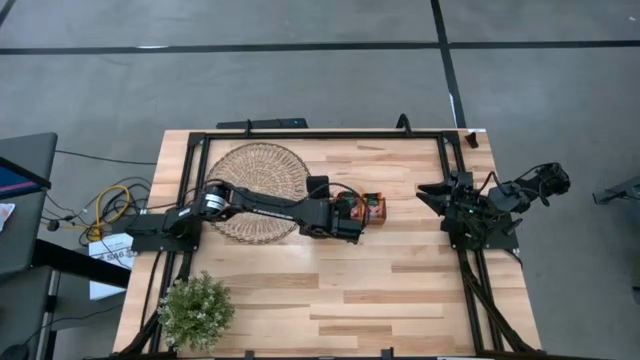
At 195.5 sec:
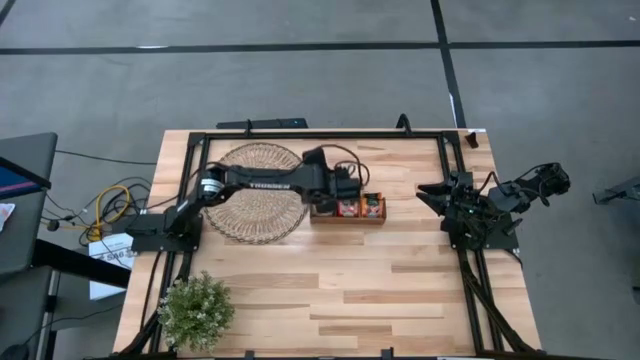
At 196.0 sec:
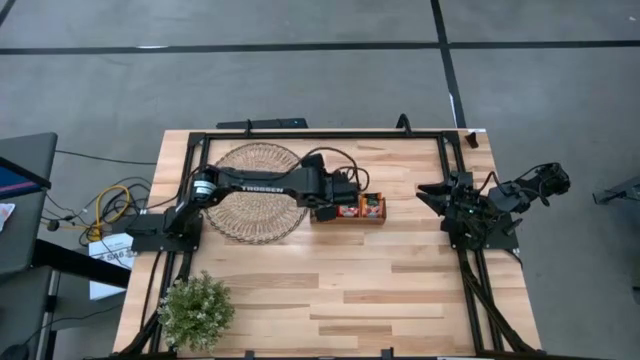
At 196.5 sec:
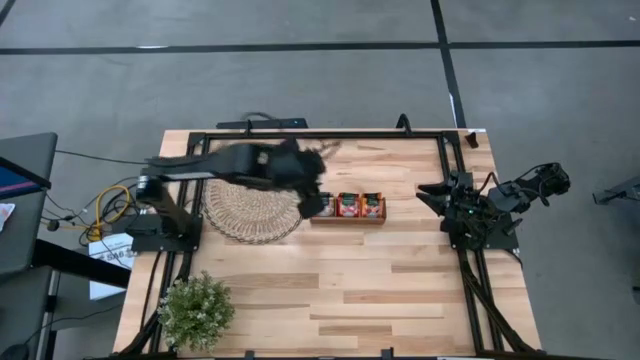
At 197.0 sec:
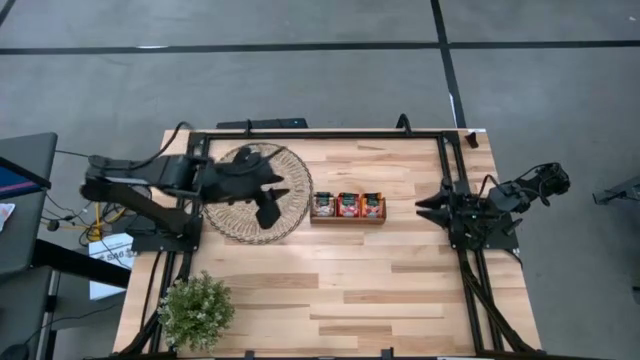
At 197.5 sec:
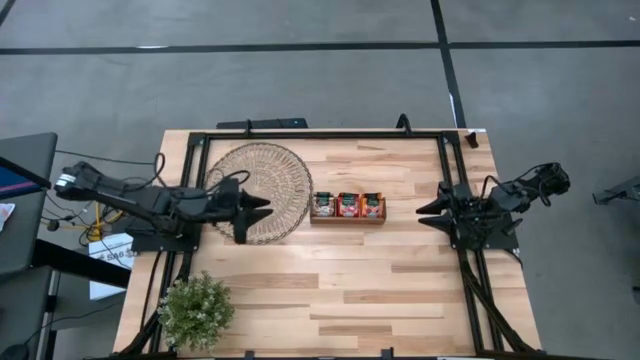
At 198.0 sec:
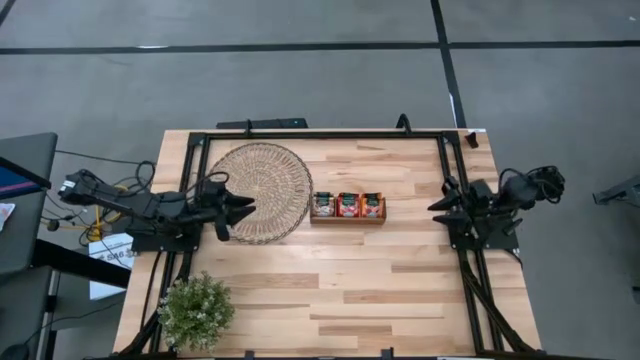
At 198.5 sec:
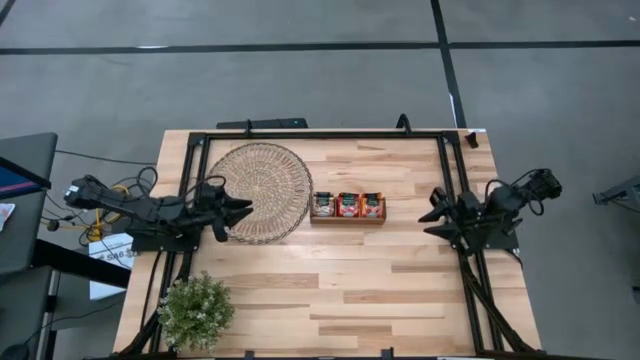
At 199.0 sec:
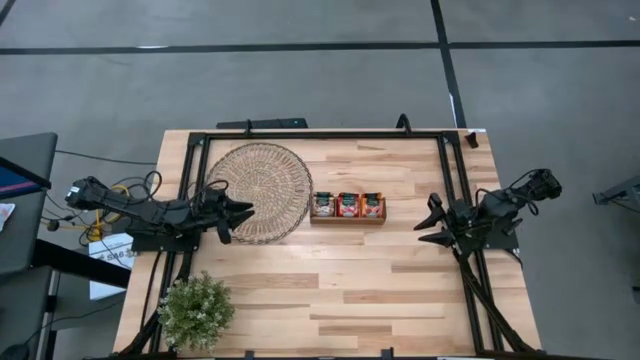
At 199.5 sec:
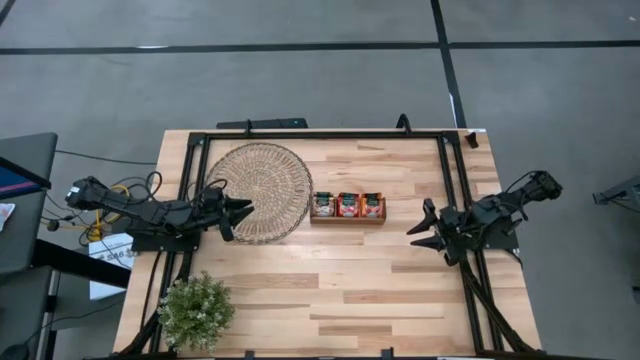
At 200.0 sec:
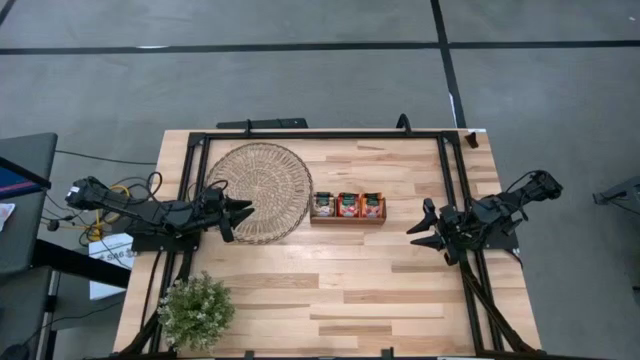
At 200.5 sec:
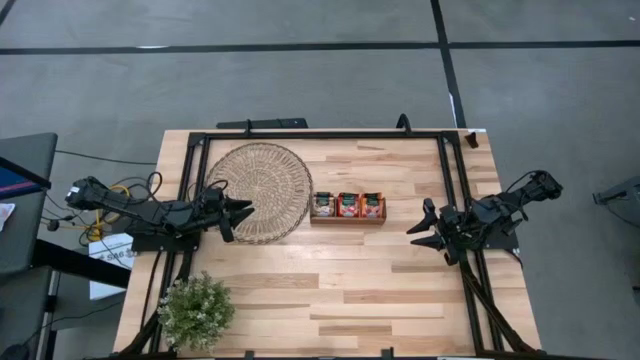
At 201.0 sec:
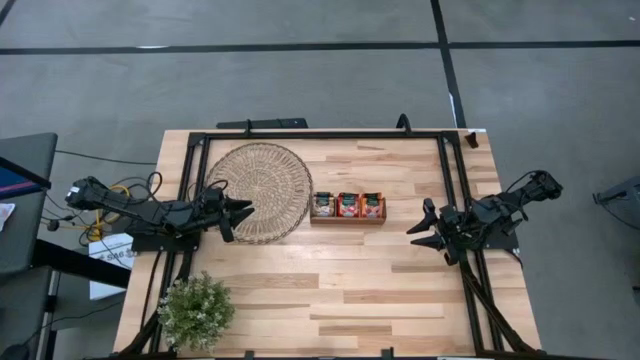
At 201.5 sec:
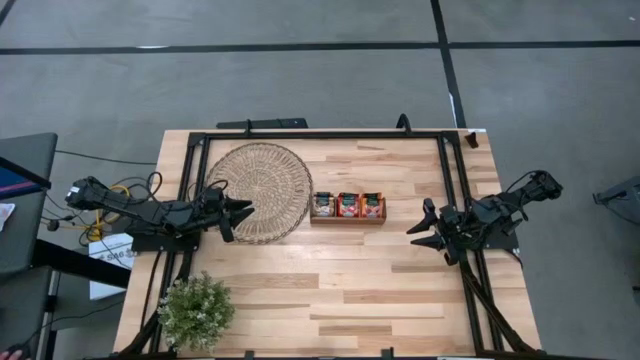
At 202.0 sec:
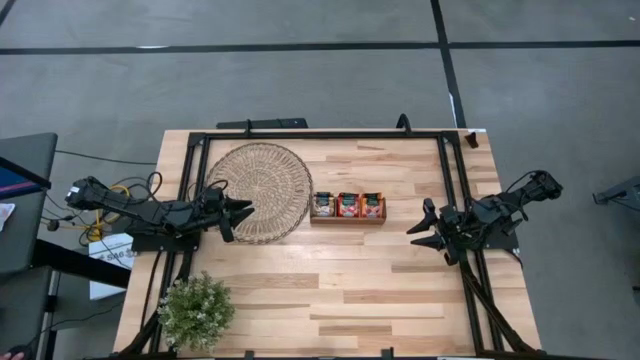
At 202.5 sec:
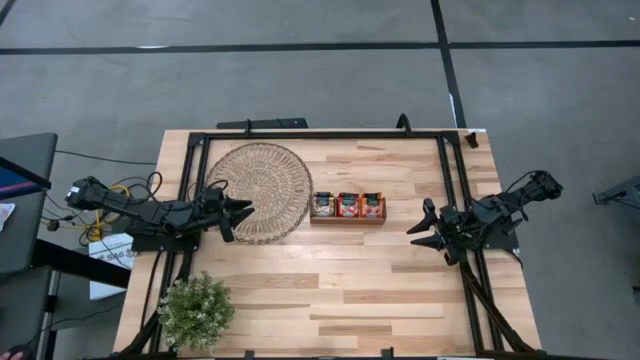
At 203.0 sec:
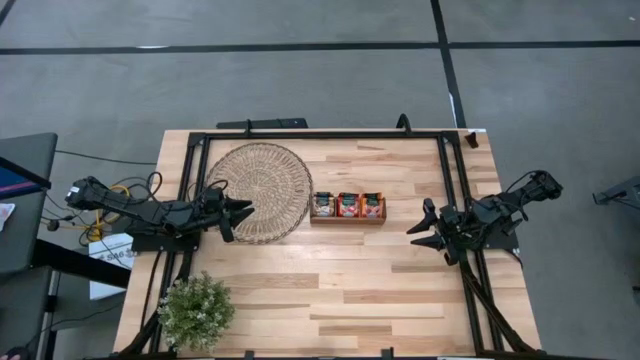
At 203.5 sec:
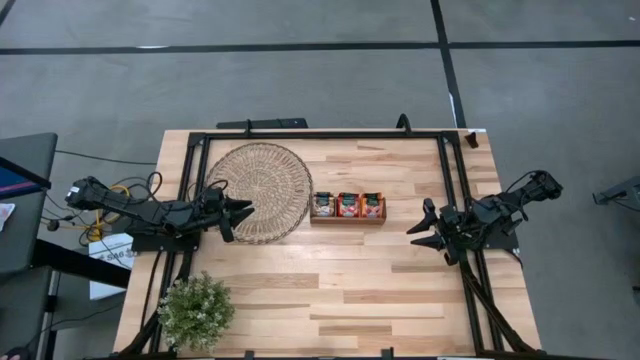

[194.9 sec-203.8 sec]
Task: Pick & Place Tea
Return to Home Position

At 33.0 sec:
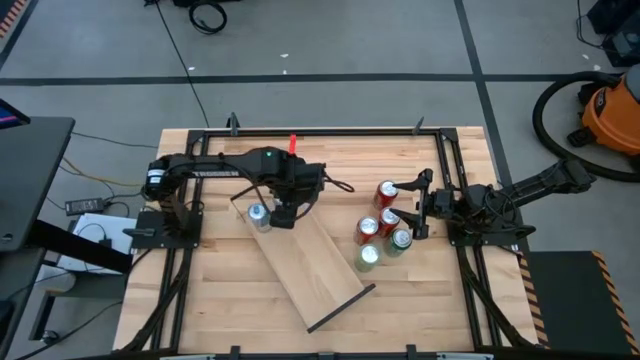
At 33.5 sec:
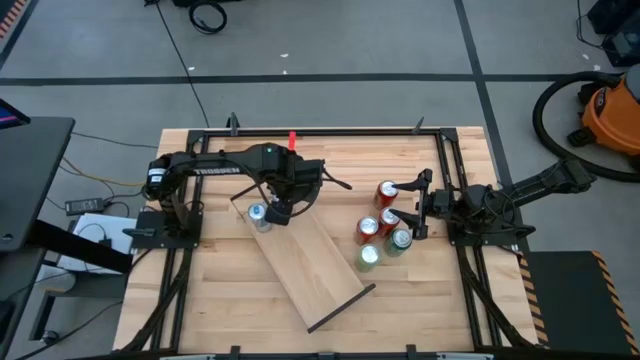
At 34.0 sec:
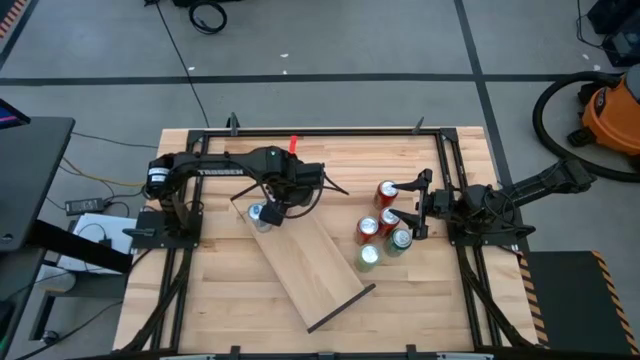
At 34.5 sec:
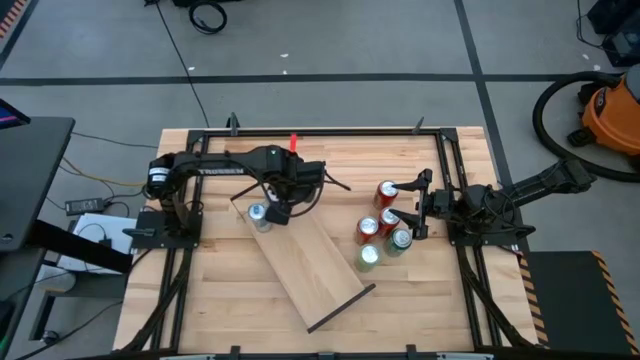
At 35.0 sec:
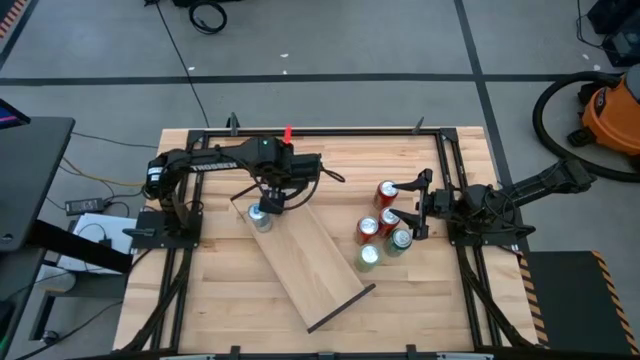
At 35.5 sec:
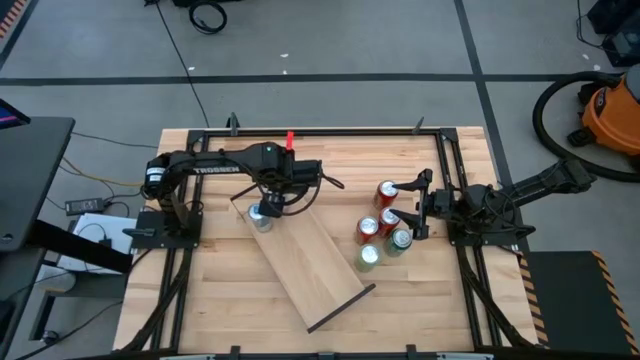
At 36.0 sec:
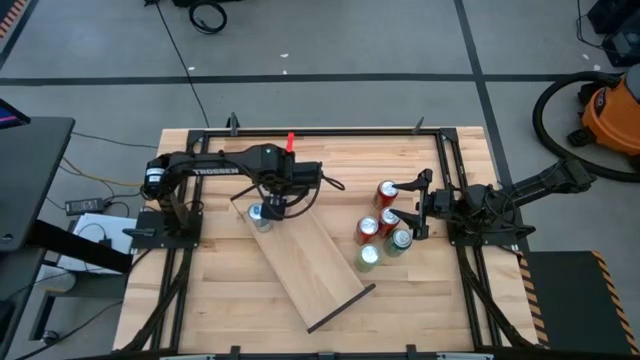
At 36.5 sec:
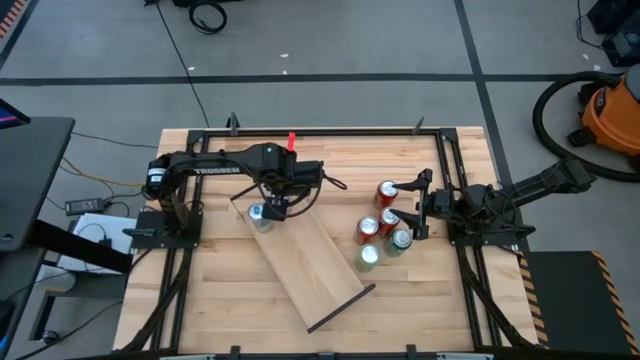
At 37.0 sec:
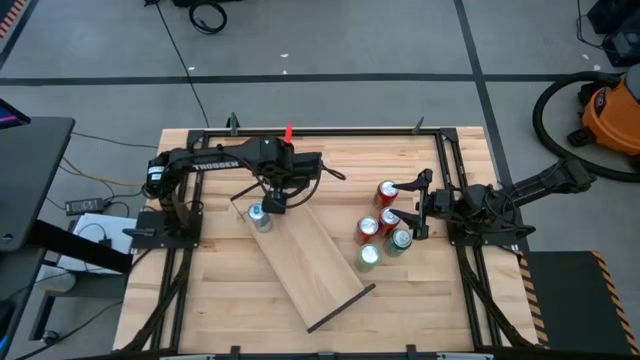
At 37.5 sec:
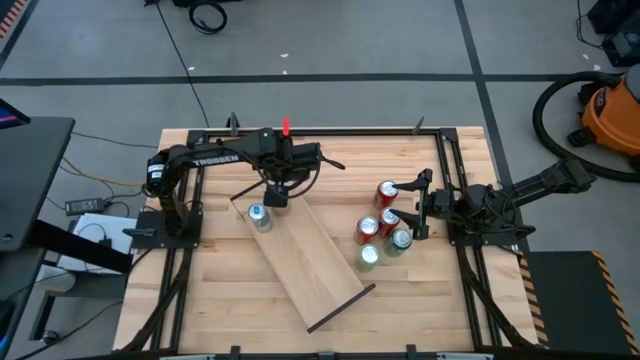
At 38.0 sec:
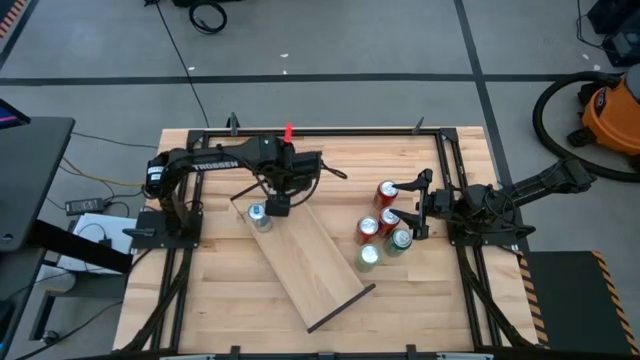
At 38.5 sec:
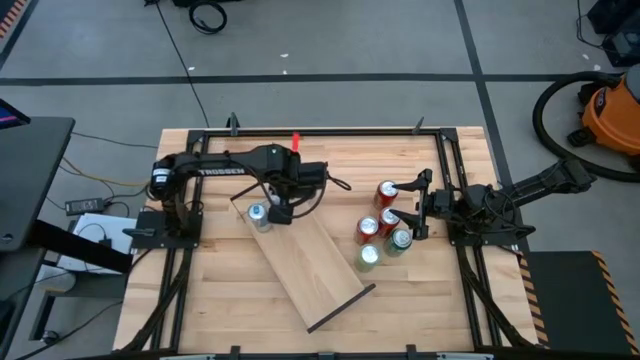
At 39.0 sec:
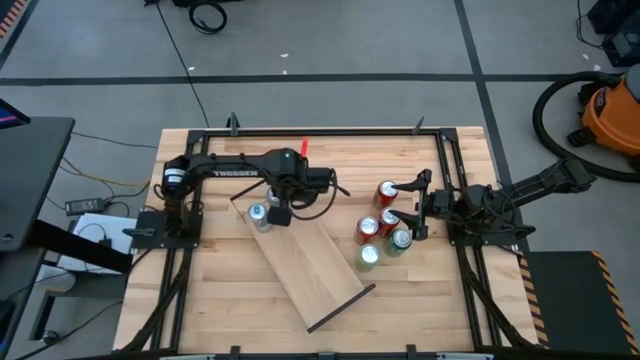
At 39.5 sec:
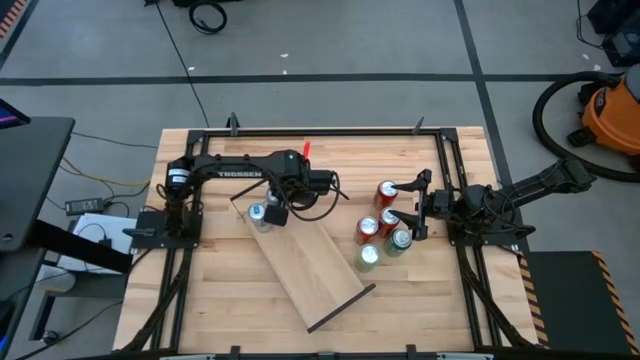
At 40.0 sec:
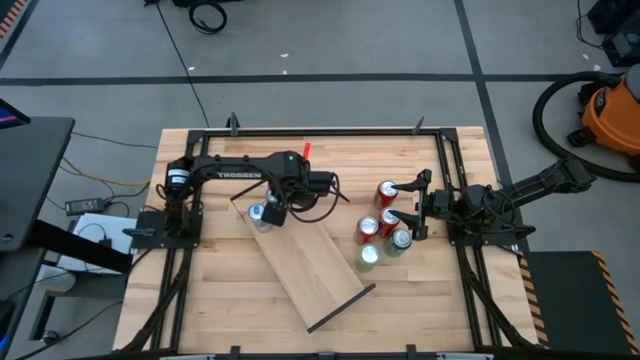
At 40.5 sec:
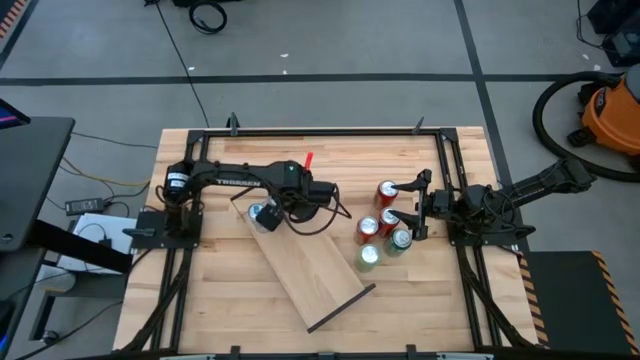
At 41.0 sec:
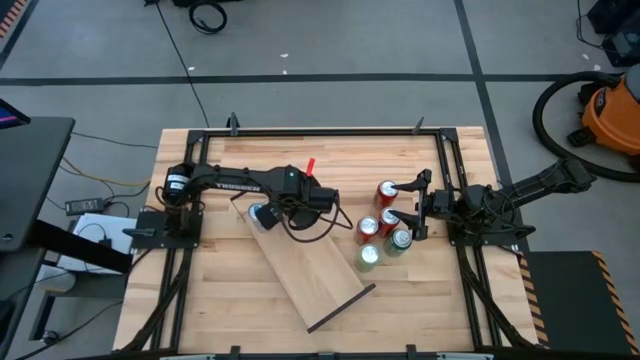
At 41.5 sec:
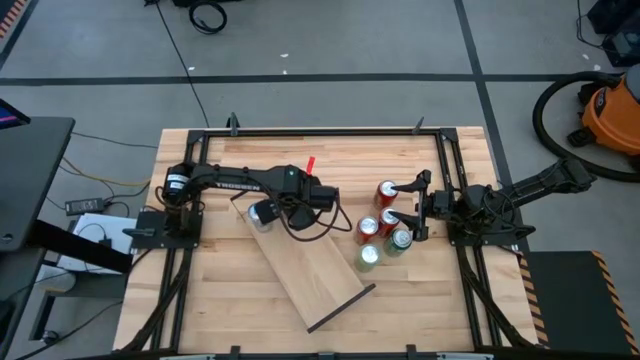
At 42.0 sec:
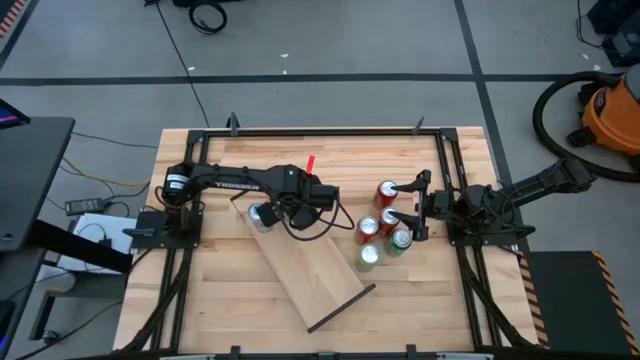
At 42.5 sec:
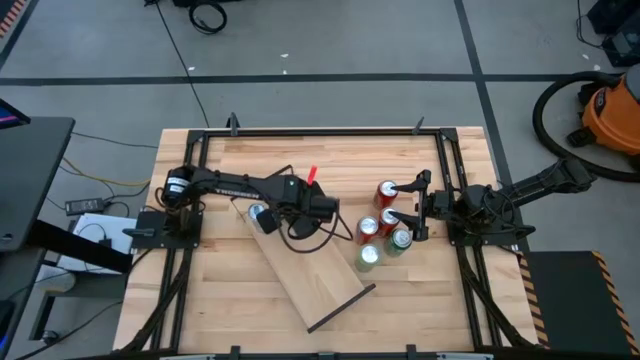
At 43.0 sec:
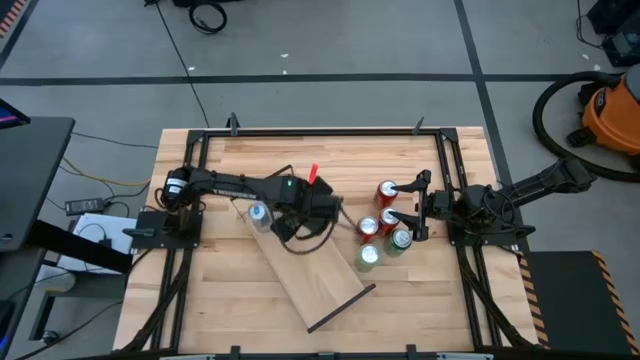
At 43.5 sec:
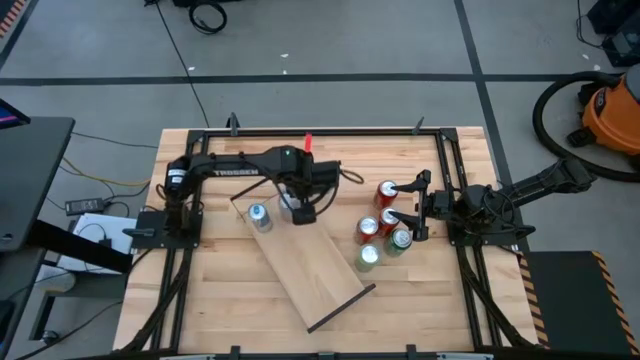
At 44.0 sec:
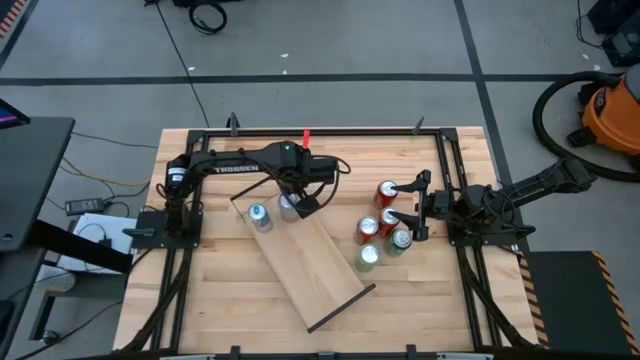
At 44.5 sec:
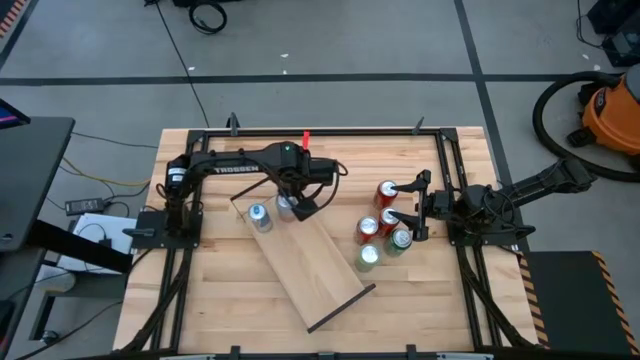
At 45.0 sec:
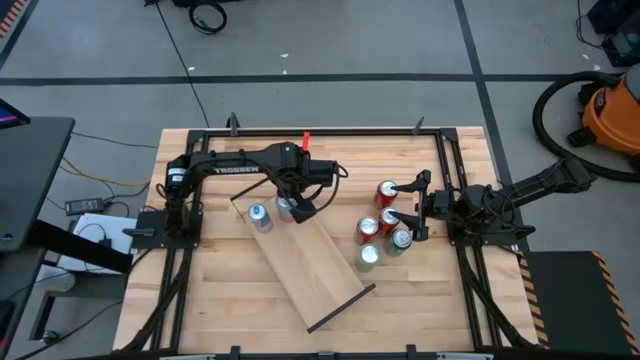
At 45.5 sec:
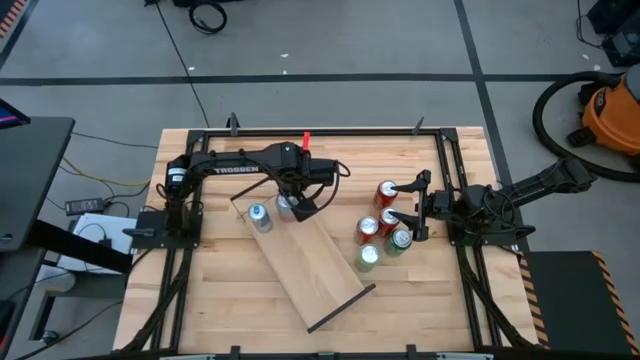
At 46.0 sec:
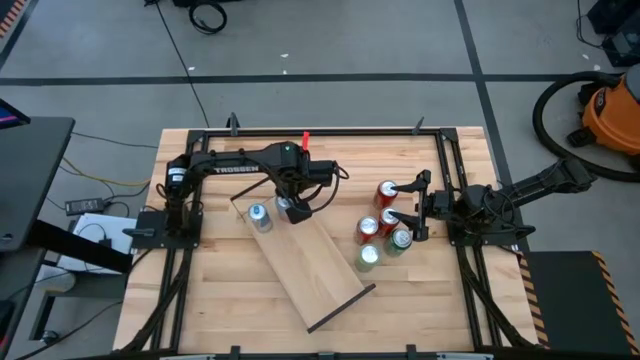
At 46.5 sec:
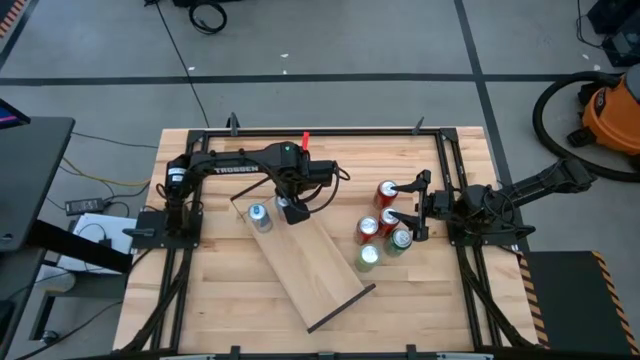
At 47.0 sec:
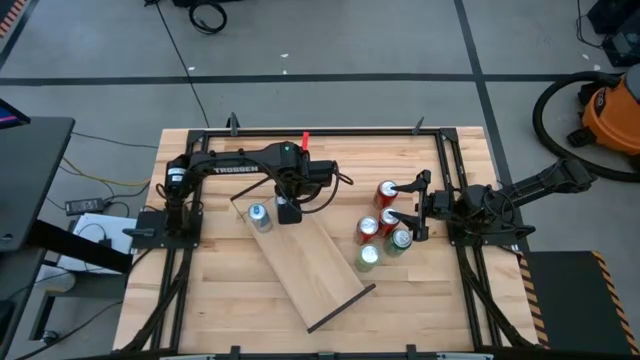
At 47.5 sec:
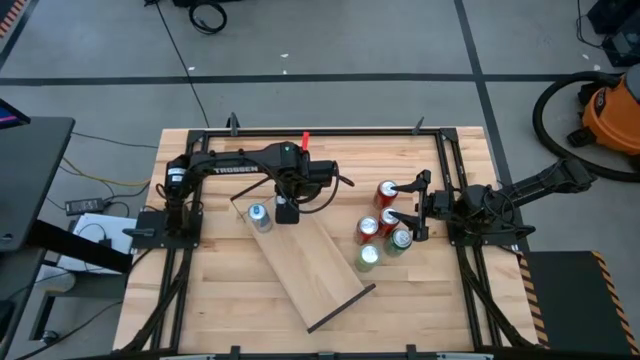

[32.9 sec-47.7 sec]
Task: Place canned beverage on shelf
Put the orange white soda can on the shelf
